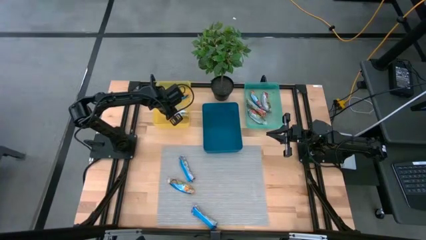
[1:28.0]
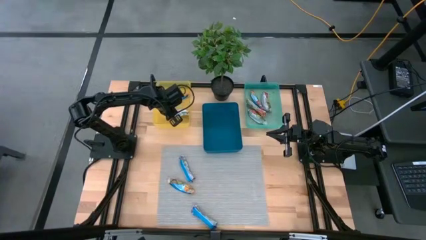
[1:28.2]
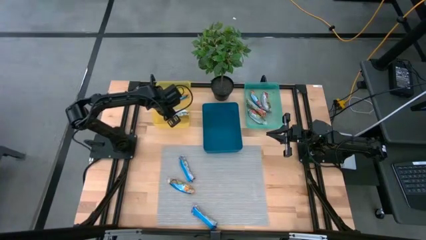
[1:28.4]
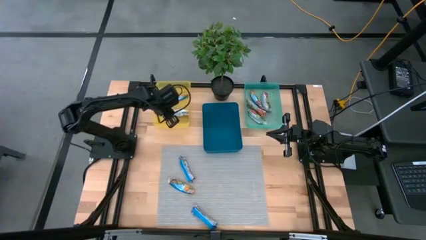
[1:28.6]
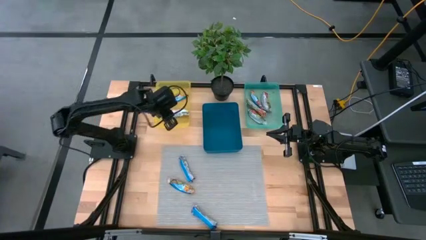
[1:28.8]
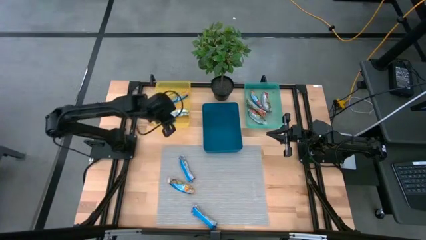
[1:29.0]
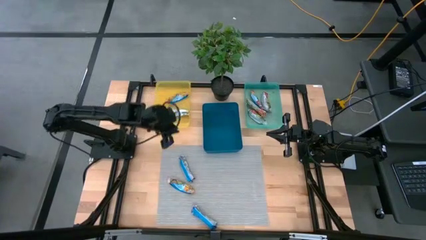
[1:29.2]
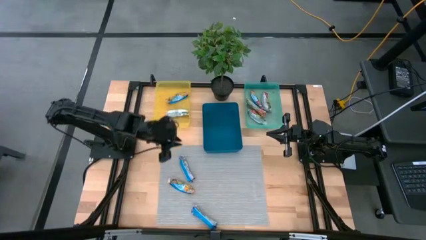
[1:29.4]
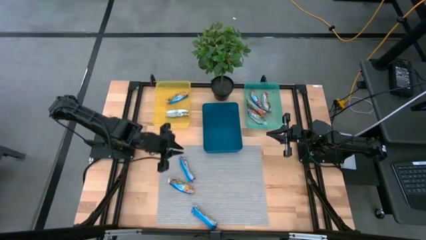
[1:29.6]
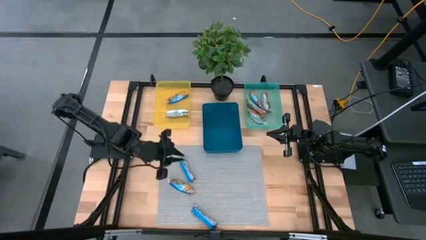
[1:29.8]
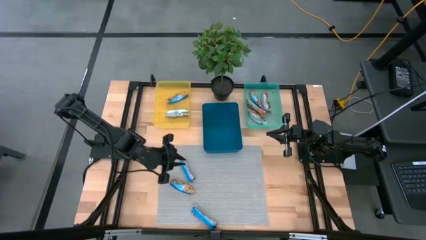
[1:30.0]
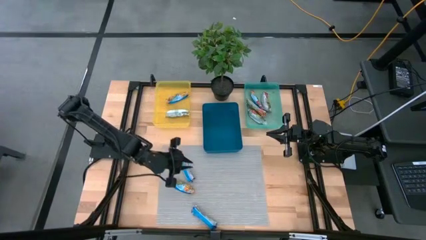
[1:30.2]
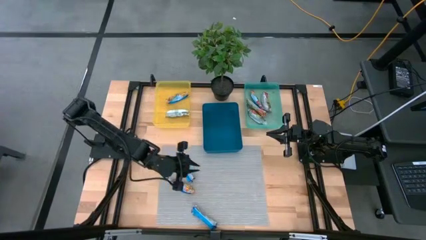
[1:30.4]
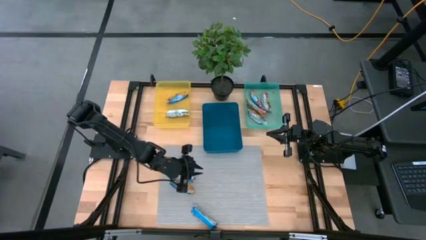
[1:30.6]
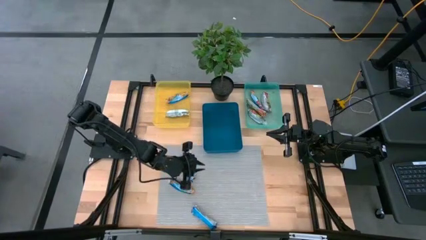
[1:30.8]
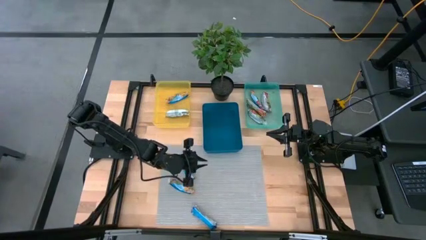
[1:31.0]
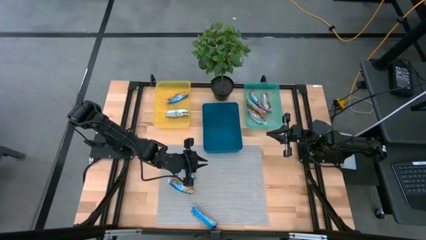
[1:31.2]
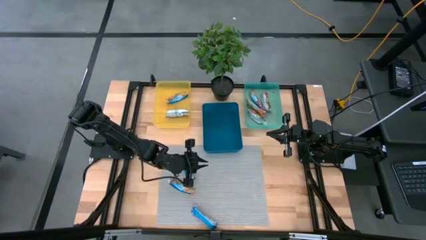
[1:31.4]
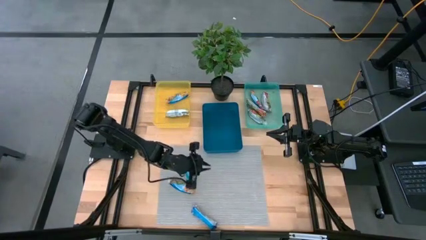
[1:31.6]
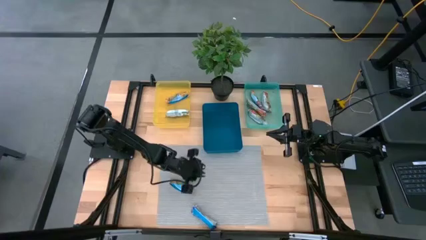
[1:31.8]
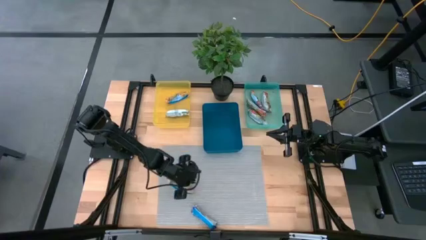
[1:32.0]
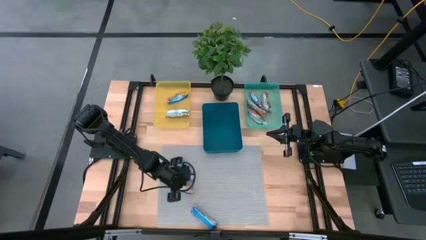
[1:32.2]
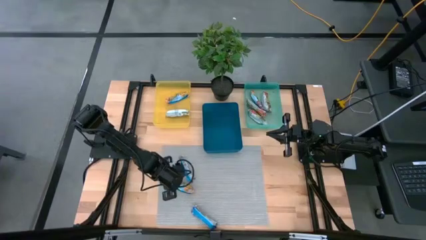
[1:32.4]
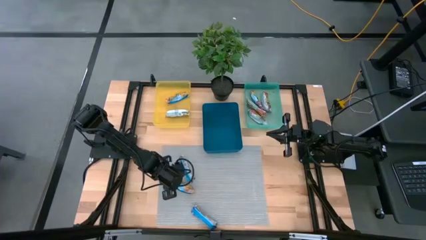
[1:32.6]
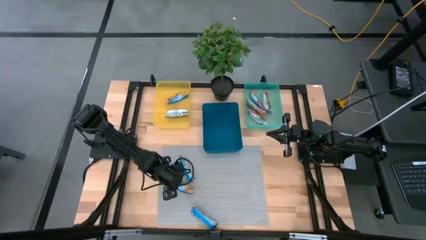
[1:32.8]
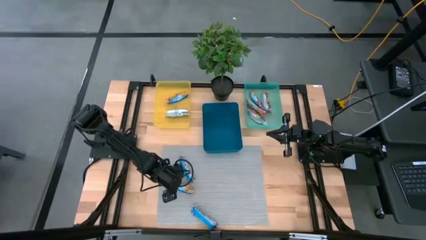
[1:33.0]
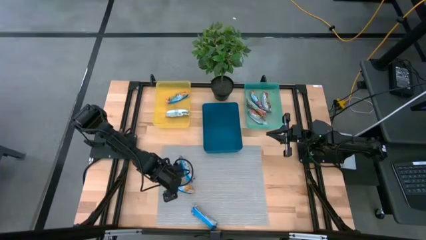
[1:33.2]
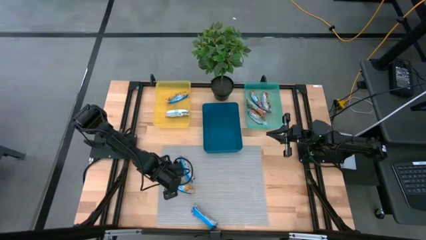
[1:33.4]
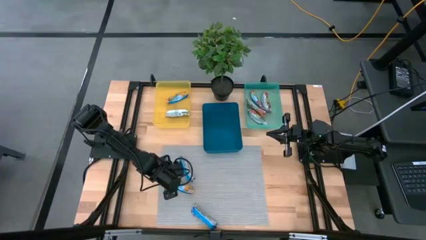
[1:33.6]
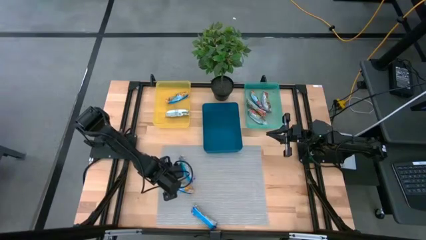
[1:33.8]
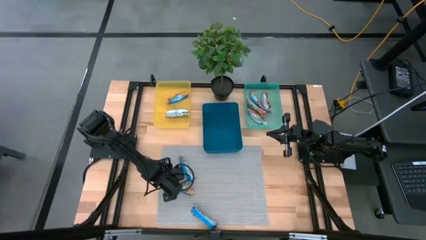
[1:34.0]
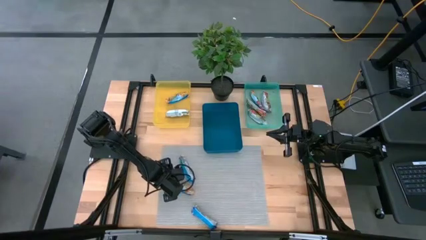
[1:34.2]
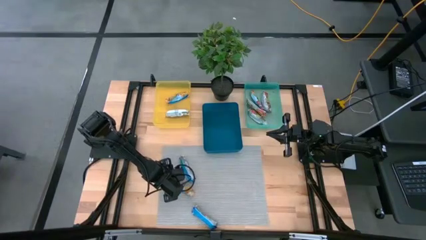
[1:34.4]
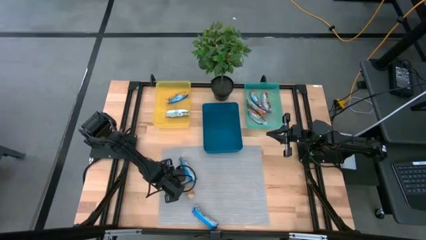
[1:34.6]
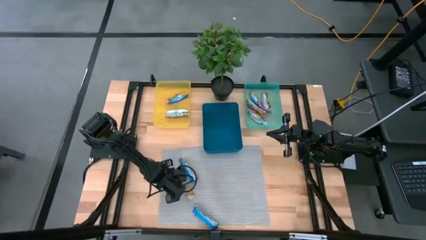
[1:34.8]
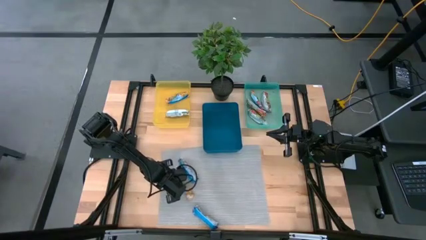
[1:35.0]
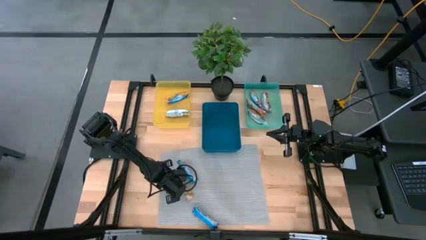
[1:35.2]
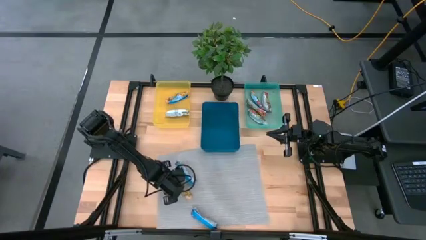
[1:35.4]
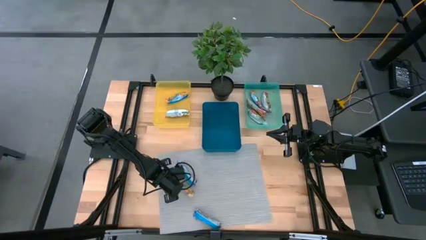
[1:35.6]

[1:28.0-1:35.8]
Task: Pick and place Granola Bars by type
Put the orange granola bar into the yellow bin

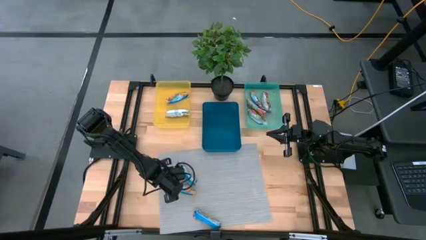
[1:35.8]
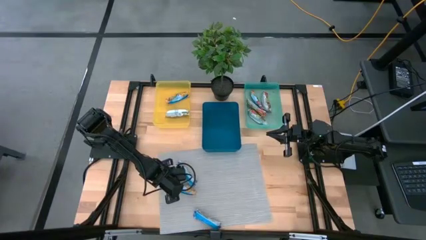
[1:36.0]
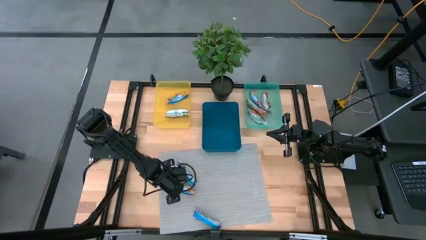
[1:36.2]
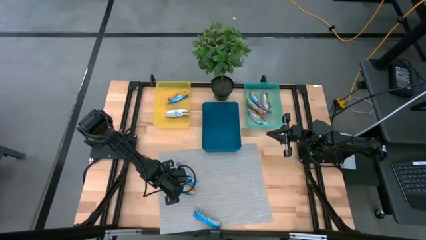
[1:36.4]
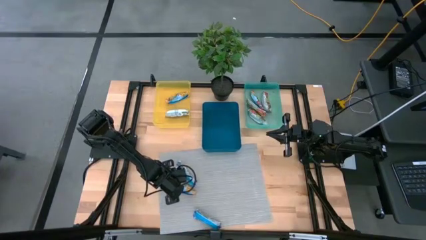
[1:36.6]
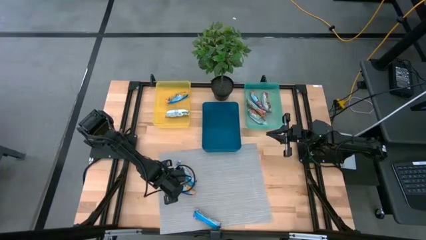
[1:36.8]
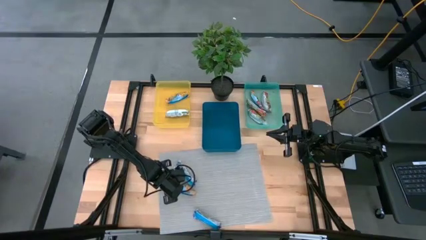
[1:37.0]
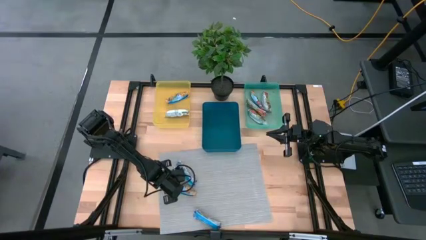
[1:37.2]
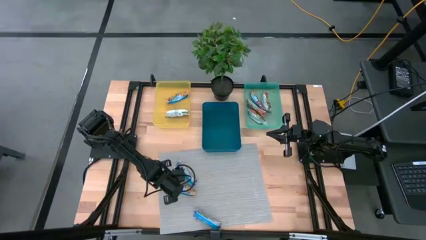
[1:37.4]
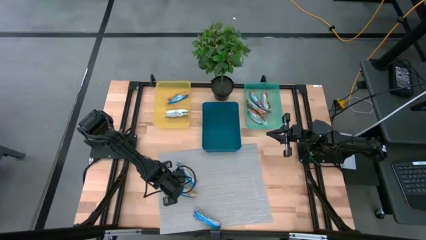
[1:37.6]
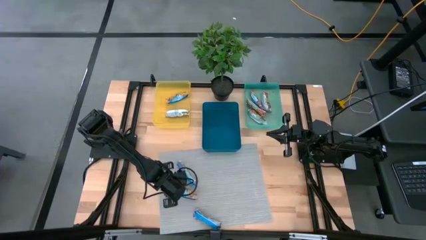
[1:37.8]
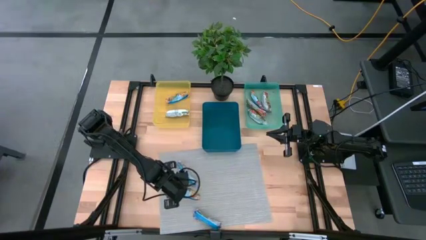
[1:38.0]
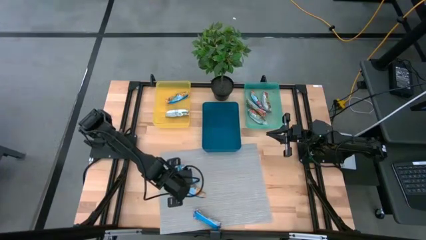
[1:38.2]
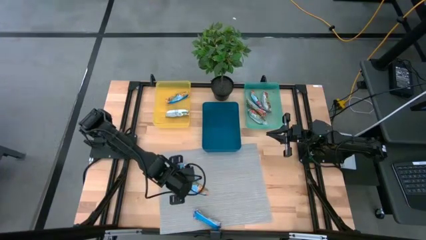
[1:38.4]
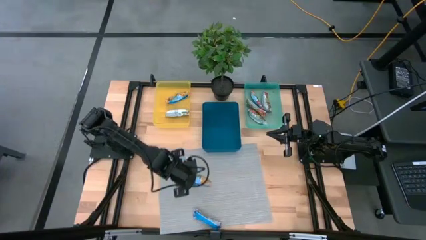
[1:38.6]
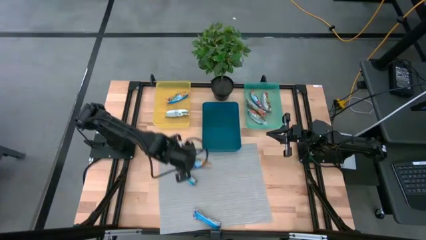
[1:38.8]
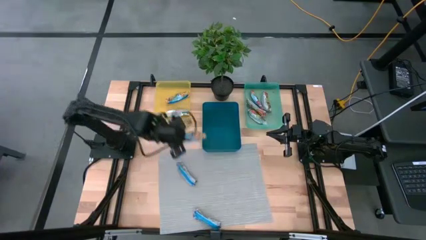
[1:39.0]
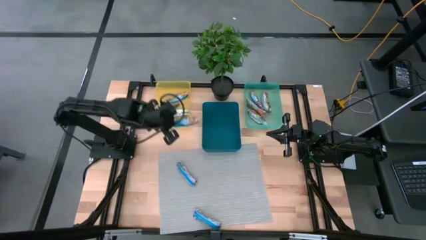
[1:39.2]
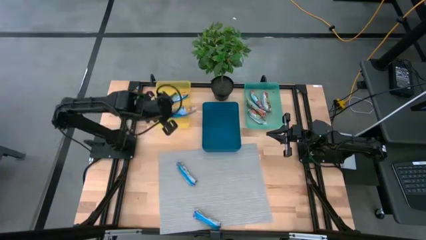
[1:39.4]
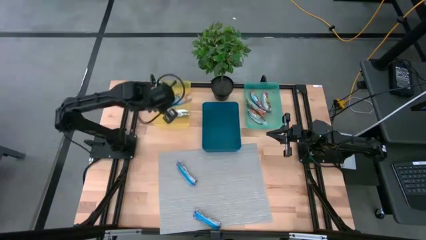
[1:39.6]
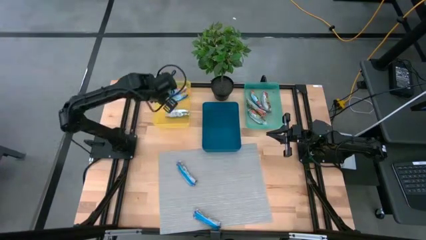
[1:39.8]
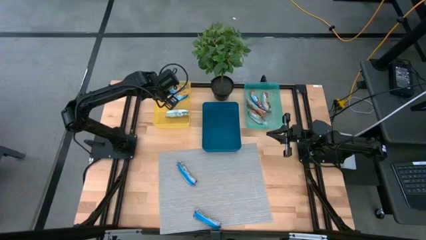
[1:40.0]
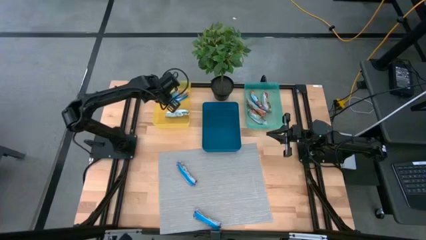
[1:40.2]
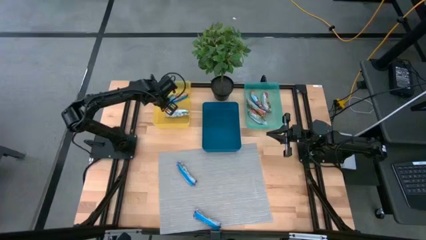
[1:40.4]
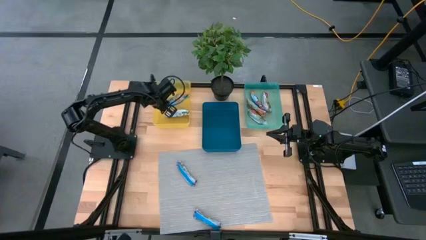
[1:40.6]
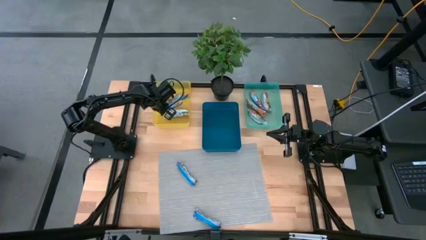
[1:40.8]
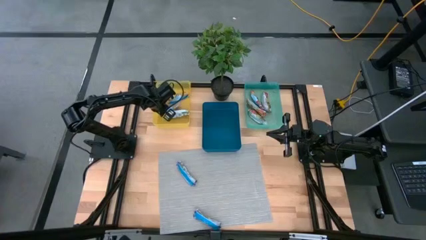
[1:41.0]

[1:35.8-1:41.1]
Put the orange granola bar into the yellow bin

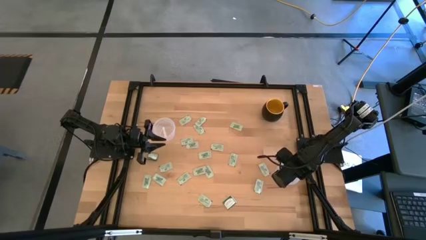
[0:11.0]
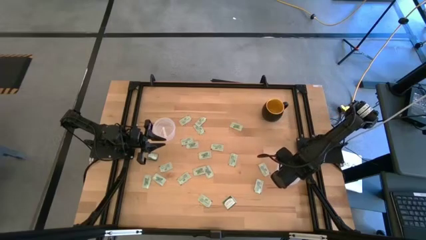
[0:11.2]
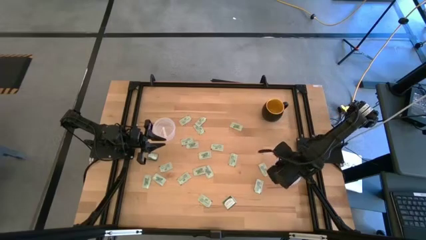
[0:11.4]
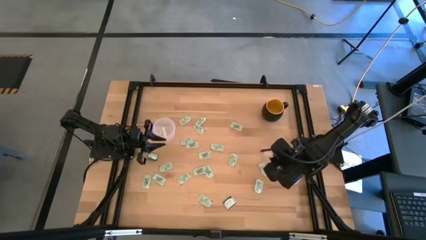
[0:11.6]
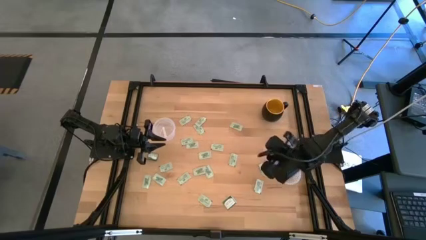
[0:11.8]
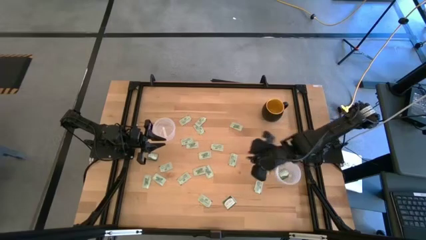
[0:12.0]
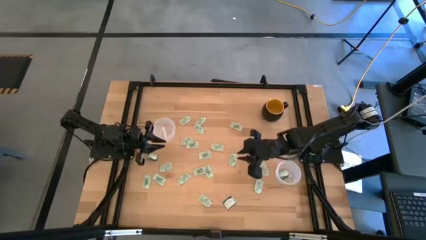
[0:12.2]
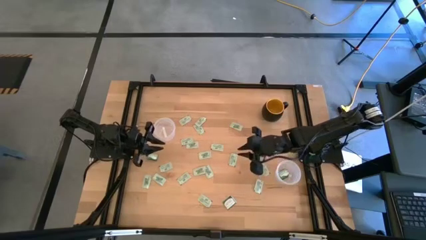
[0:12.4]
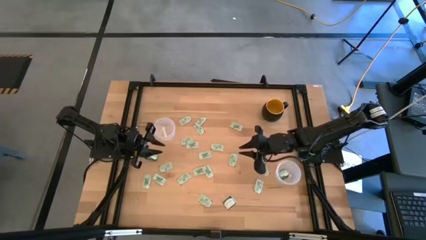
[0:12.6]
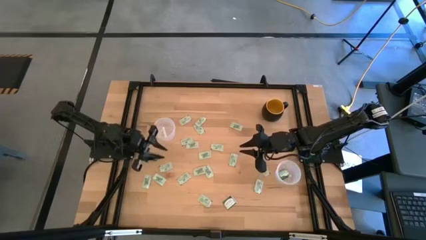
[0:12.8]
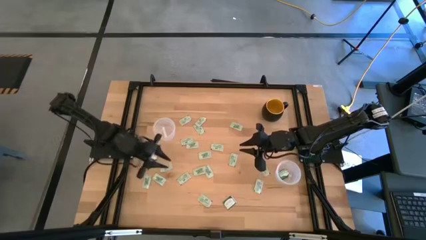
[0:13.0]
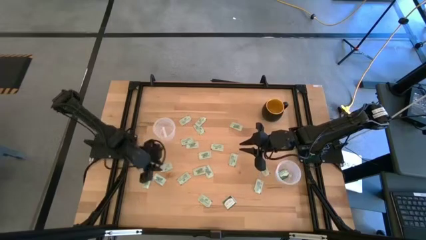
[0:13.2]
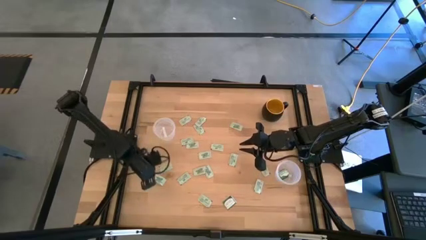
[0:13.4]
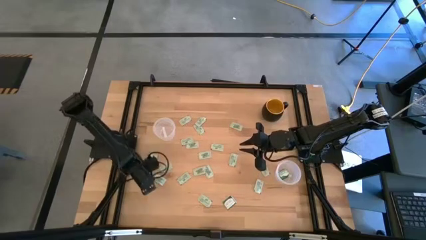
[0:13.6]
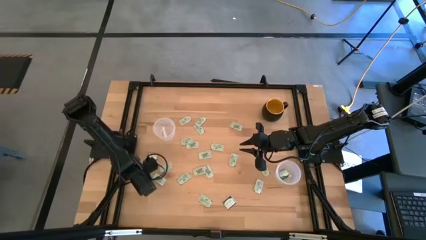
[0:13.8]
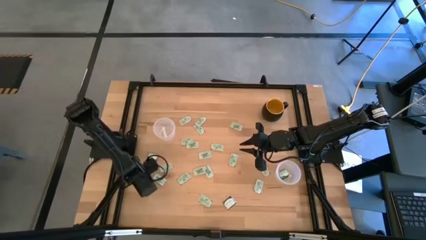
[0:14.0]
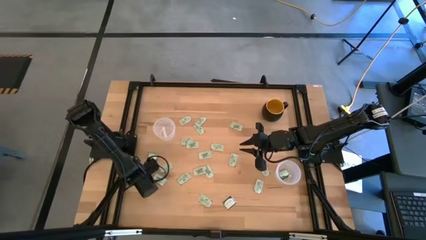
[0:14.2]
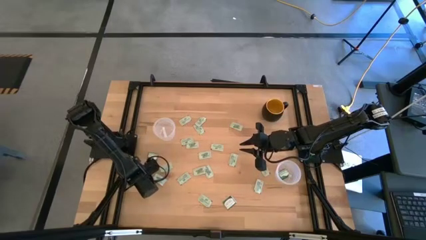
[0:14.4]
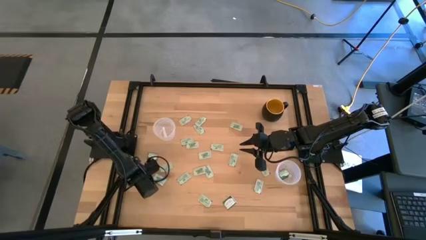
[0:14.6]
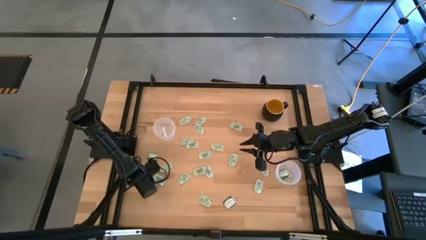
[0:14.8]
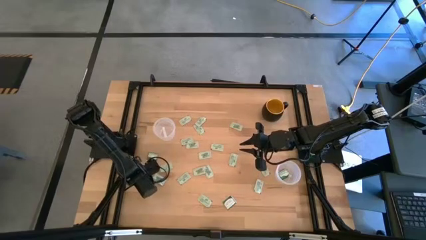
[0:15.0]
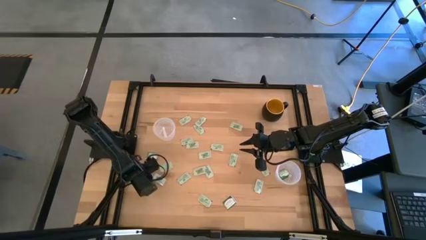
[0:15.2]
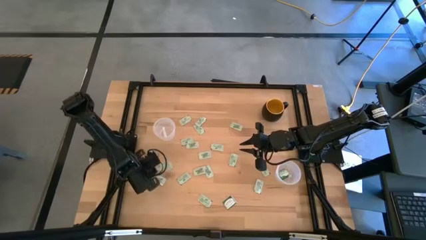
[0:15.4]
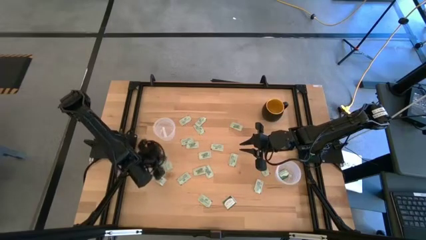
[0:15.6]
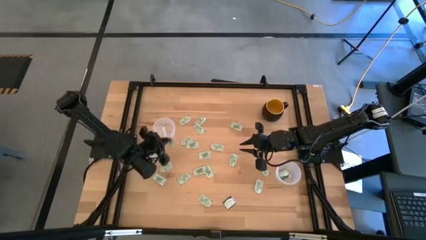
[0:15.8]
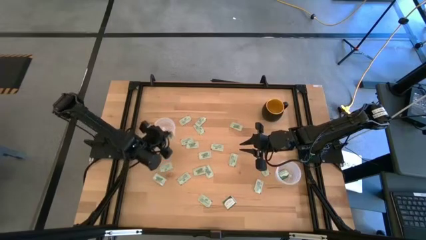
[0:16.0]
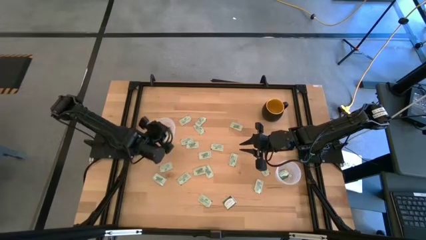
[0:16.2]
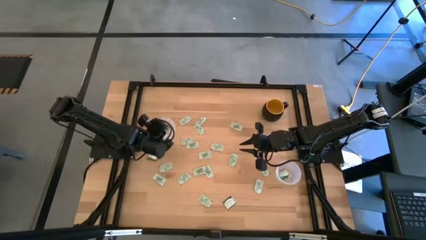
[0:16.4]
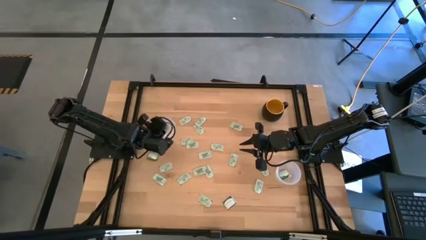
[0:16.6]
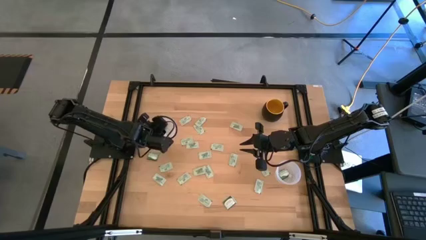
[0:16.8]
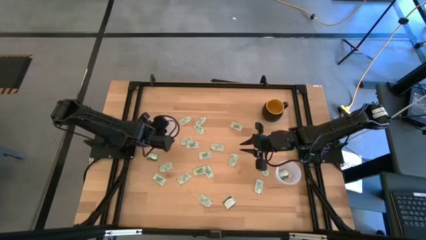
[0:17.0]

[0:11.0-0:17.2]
Task: Pick and place Stevia / Truvia into bins
Put the white stevia packet into the left transparent container
